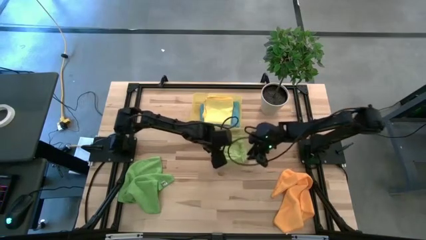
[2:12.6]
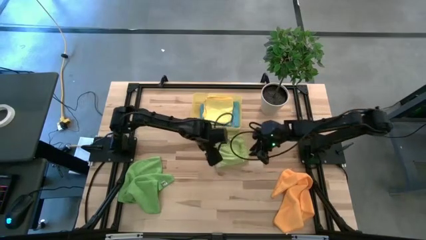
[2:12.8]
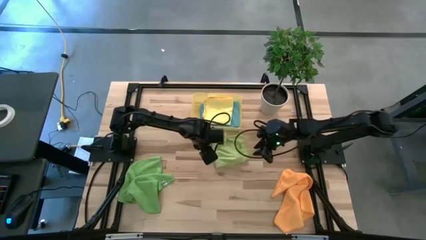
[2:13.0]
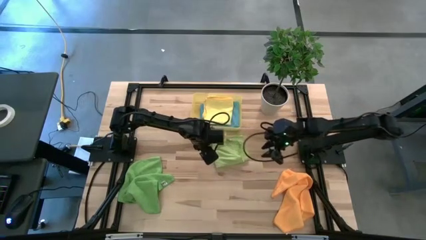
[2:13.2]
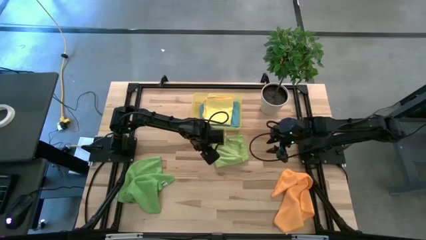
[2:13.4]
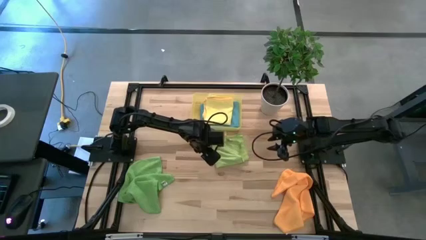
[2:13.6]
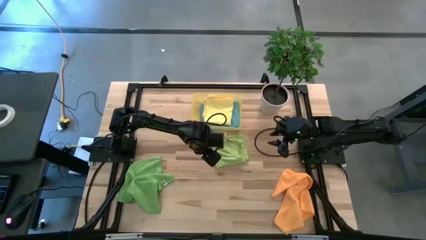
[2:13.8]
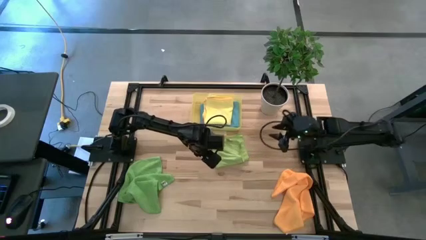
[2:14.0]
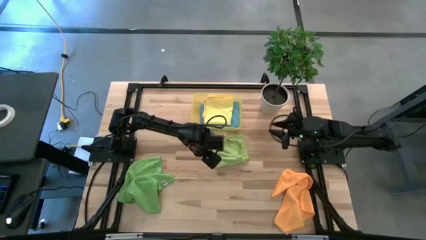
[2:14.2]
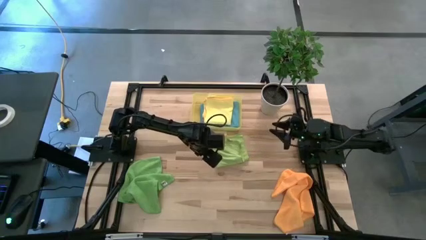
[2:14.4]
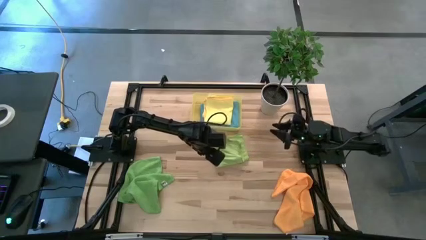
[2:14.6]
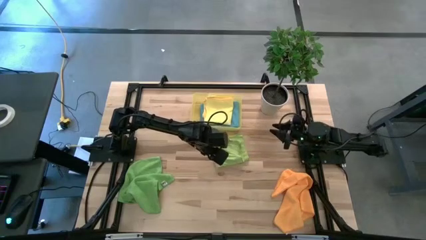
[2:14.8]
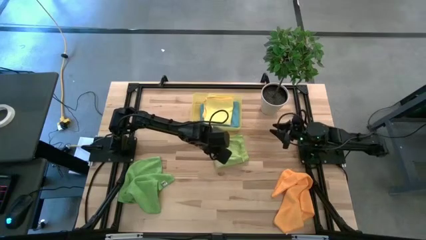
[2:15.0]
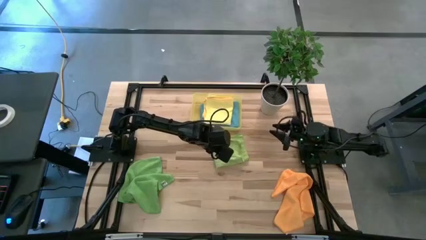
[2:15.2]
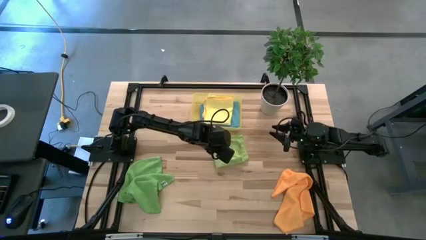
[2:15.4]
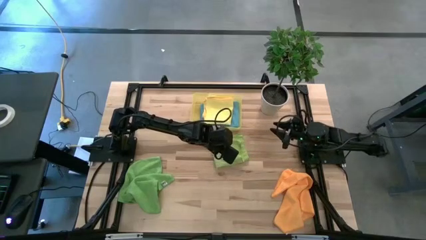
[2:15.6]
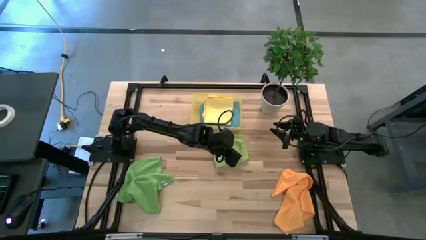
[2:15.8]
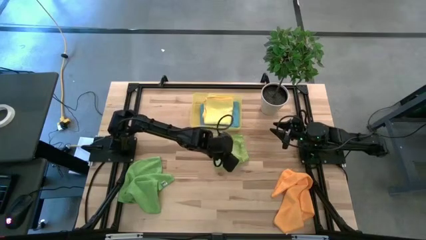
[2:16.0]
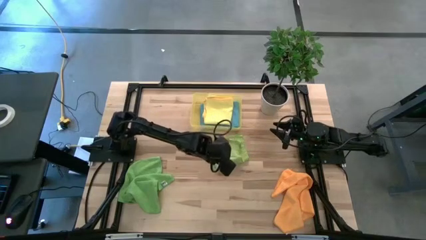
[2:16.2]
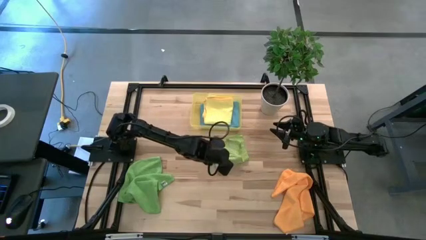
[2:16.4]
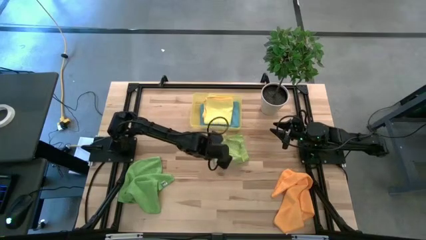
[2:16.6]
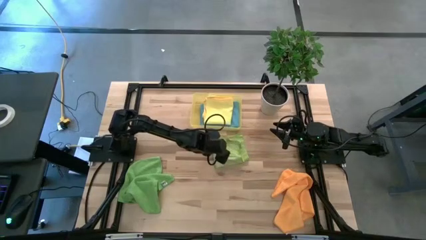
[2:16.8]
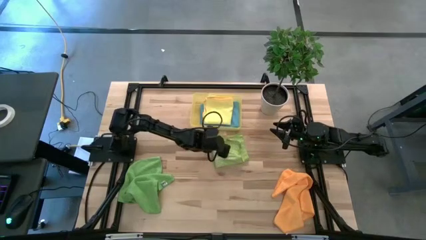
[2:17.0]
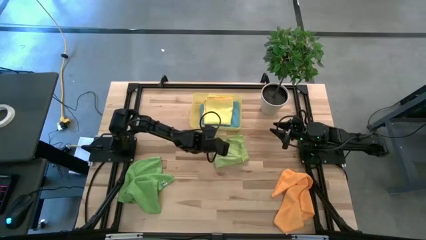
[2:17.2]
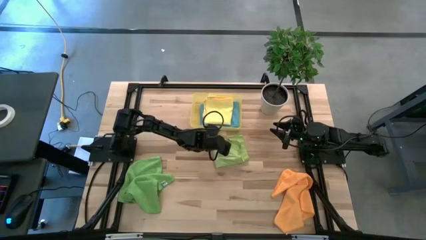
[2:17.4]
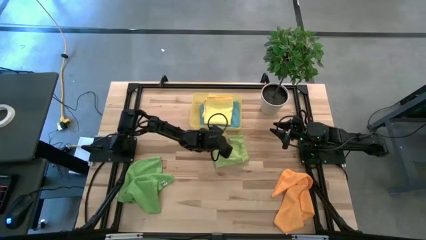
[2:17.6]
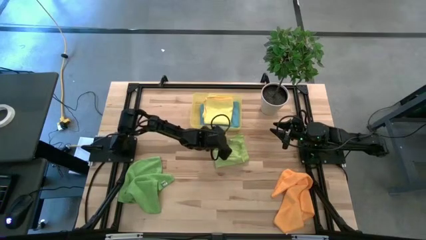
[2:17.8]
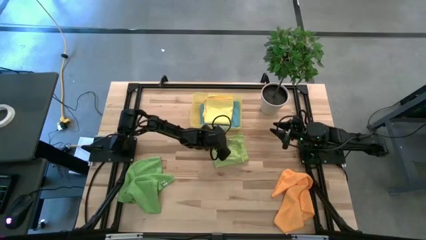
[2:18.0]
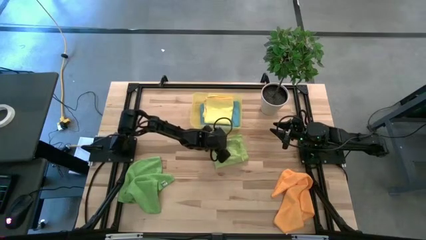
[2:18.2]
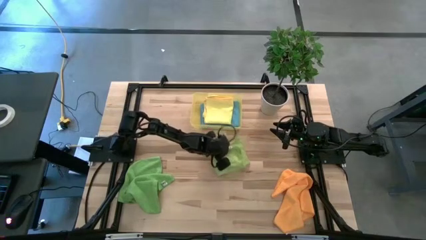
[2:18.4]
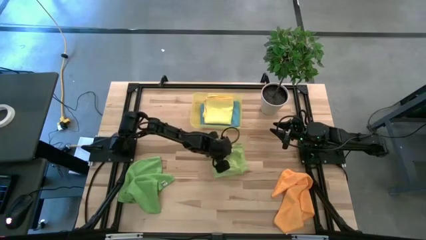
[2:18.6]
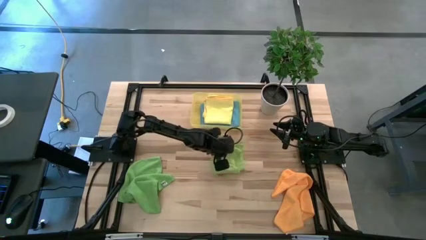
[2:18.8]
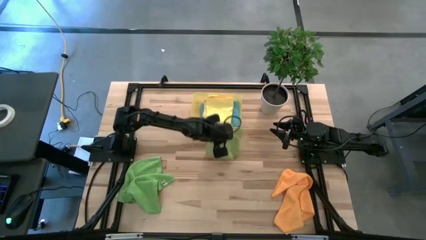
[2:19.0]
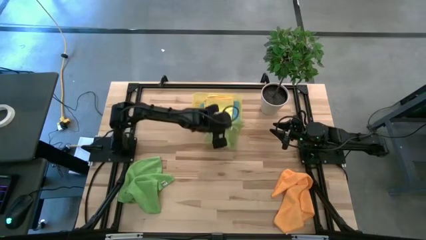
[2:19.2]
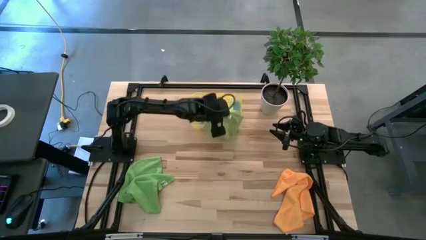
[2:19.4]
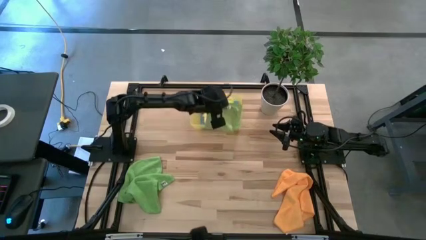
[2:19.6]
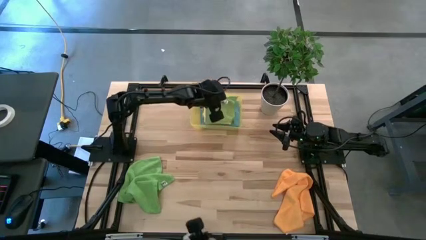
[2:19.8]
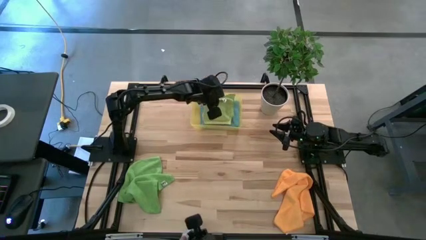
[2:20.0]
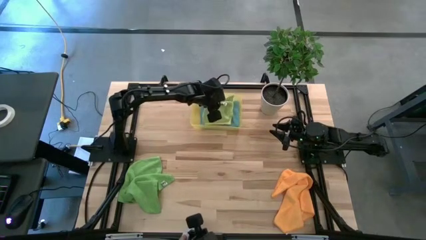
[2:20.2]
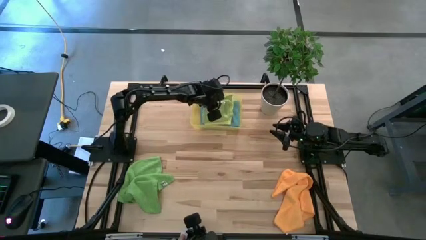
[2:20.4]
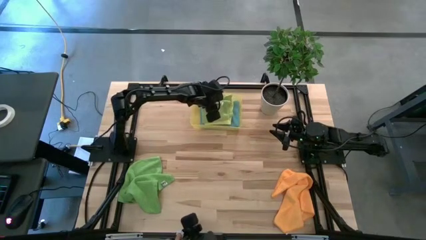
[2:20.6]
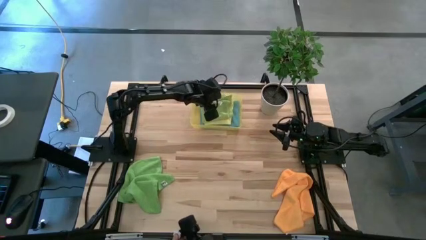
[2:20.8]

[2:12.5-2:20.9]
Task: Fold microfiber towels
Put the folded light green microfiber cloth into the yellow bin

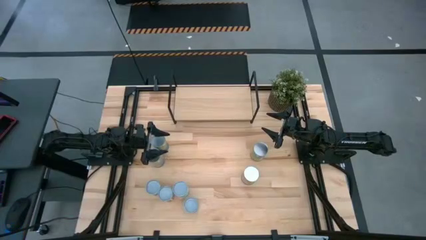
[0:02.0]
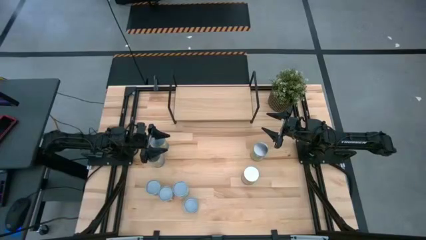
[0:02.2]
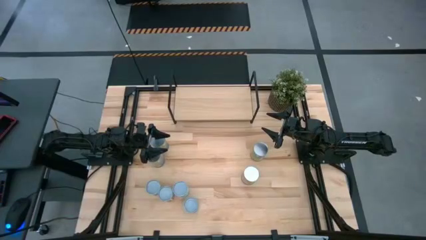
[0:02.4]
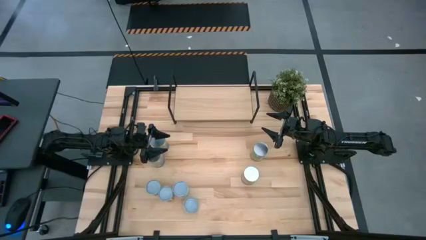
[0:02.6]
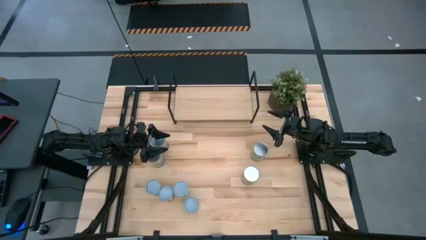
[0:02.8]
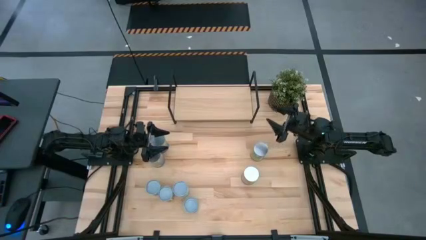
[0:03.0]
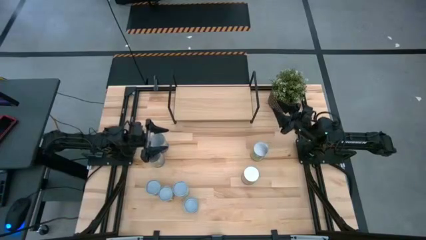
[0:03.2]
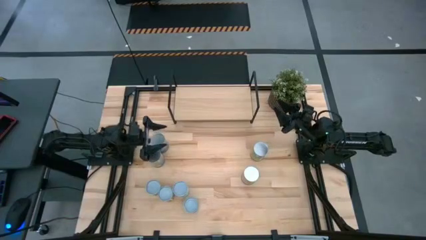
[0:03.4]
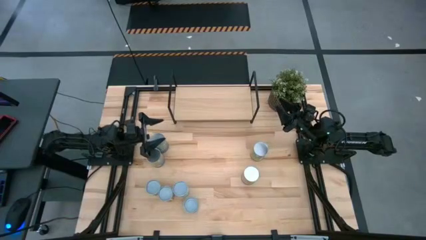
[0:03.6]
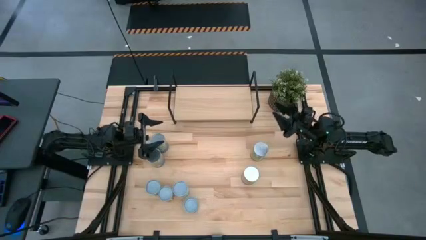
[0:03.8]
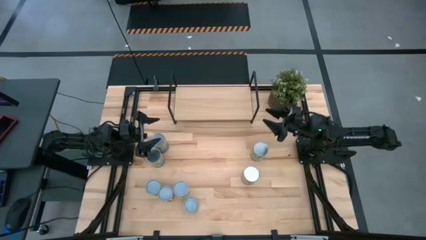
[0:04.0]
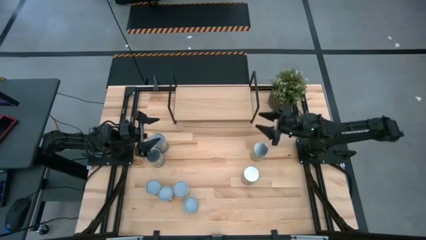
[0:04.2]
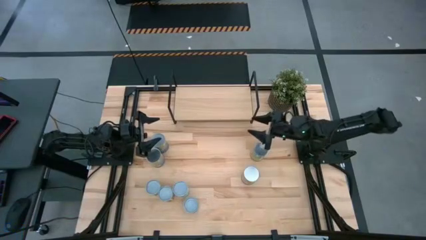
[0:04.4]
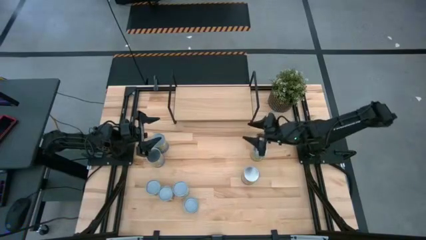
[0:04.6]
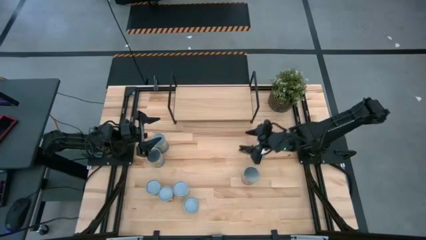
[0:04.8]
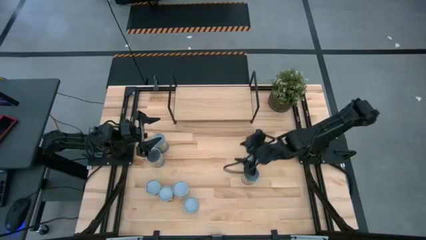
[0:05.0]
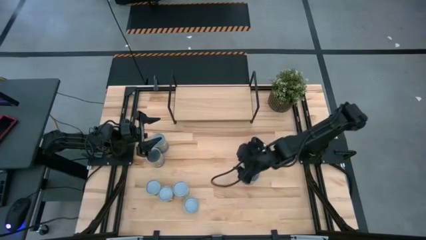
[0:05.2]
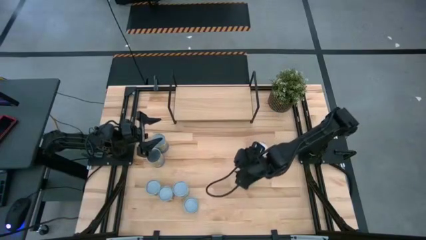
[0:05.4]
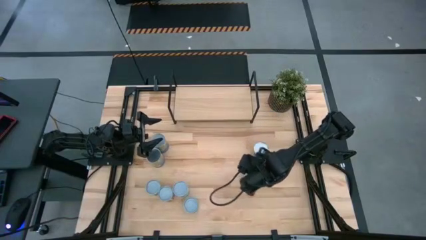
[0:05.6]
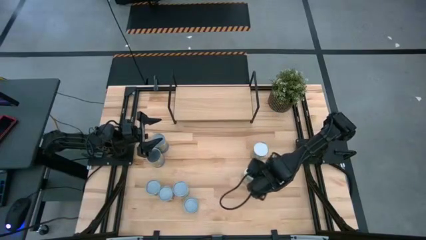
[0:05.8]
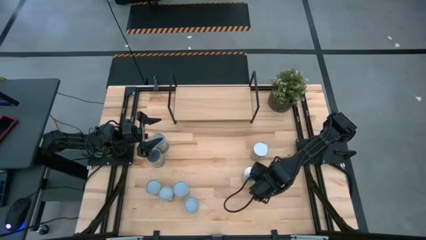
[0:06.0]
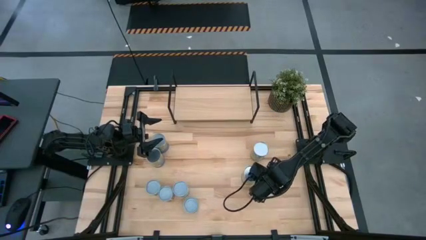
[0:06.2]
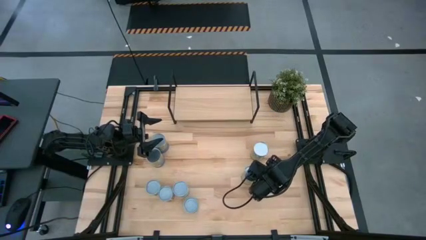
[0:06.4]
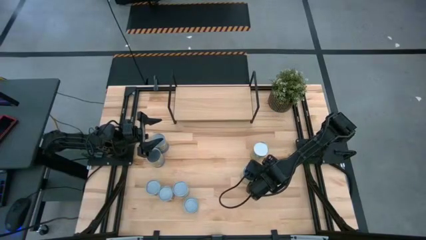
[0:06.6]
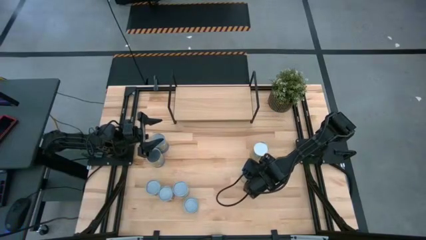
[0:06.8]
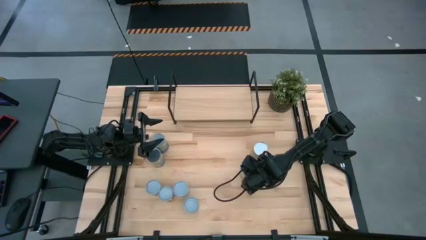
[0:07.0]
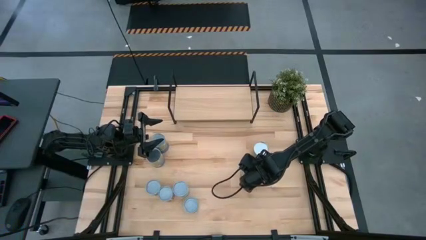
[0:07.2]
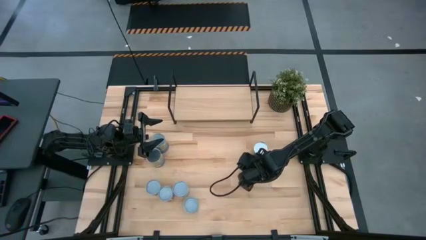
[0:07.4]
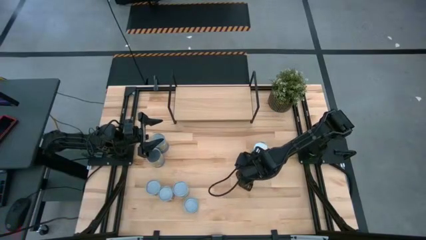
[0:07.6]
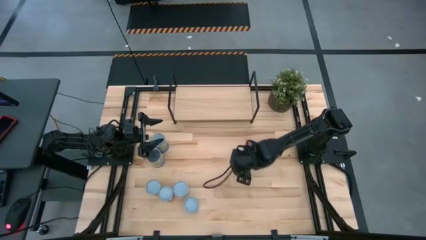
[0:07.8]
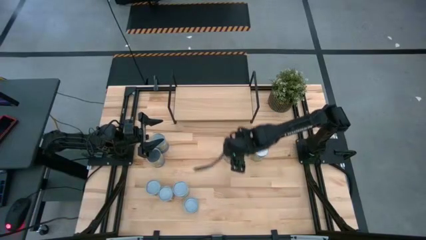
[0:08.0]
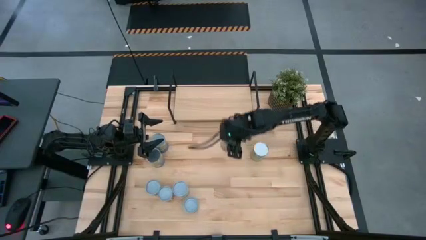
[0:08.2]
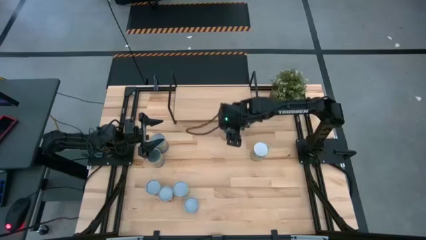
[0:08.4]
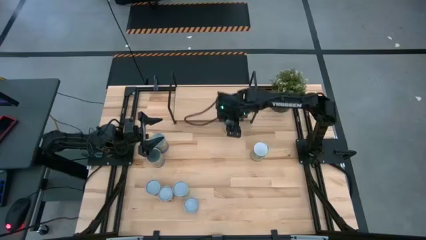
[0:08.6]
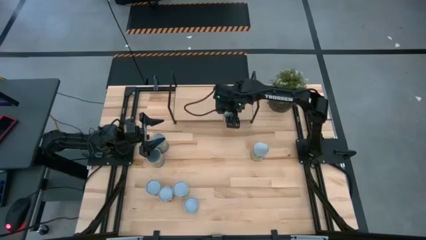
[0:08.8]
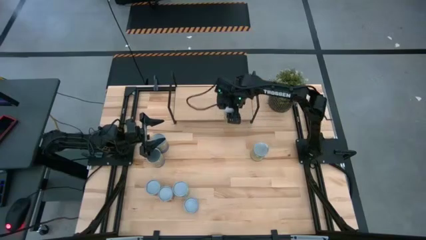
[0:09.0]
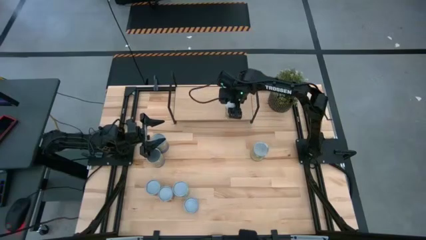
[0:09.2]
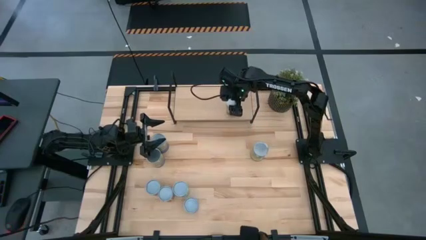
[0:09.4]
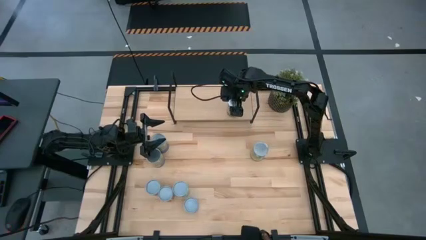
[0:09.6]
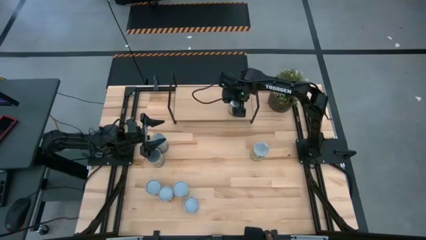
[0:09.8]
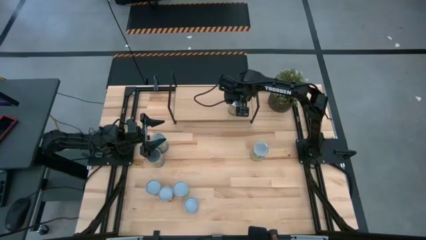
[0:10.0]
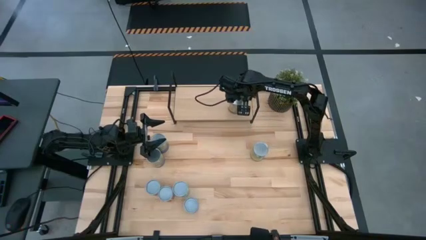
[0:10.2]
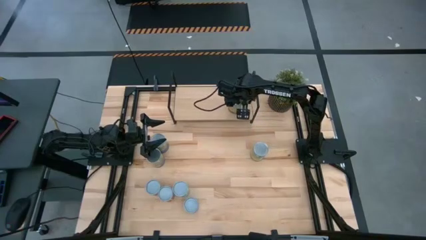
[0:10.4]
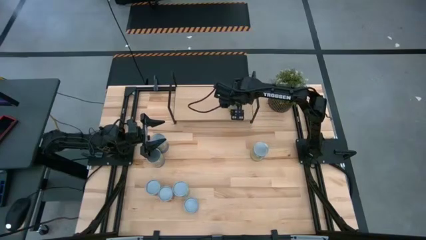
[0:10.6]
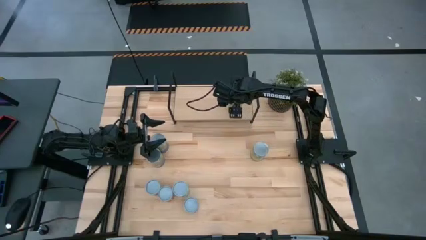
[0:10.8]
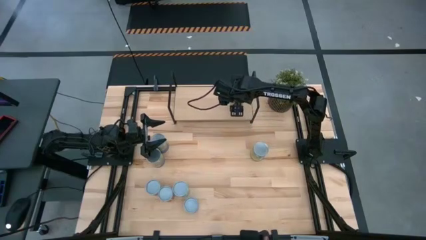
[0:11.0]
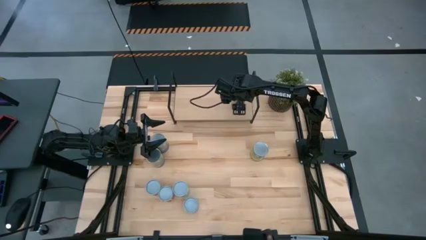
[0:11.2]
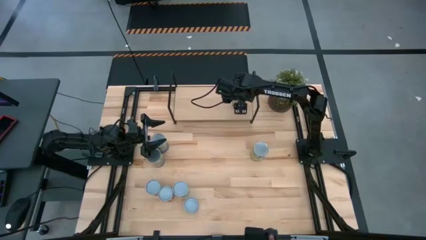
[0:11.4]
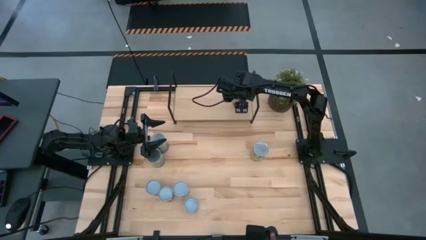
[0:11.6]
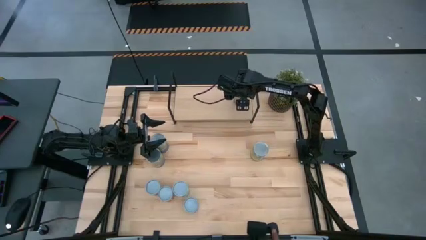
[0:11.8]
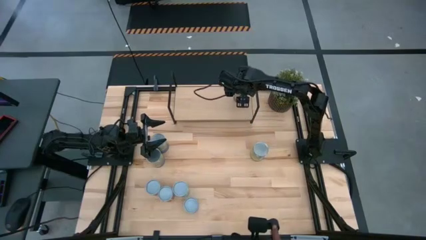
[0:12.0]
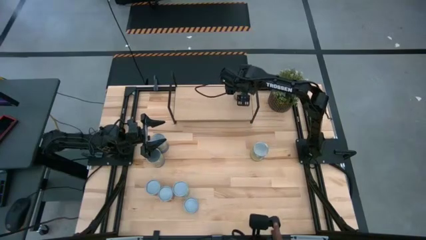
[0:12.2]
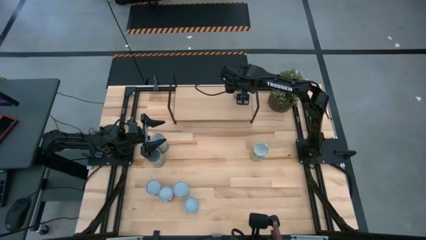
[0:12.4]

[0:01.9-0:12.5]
Task: Pick and place cans onto a shelf
Put the canned oranges on the shelf
